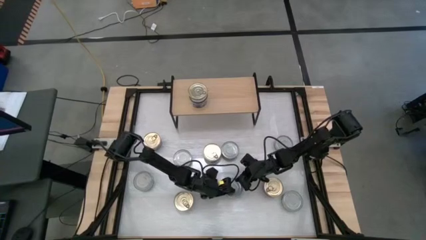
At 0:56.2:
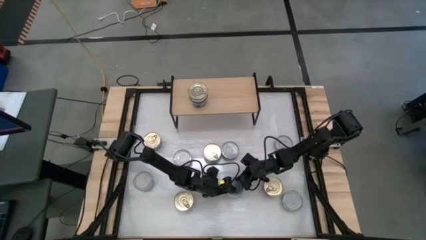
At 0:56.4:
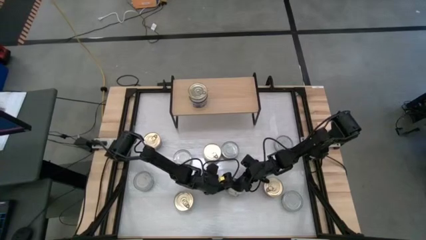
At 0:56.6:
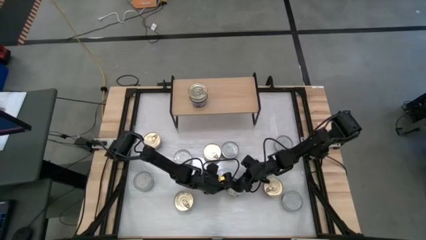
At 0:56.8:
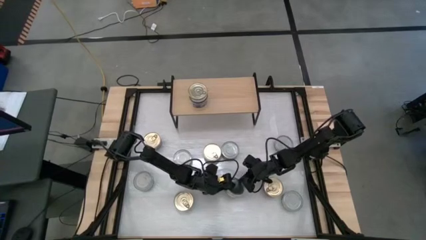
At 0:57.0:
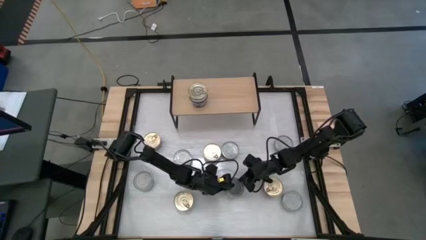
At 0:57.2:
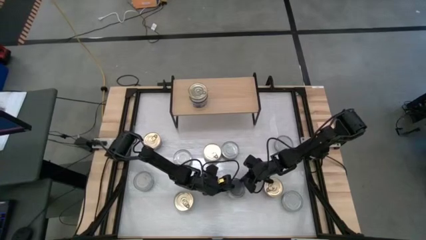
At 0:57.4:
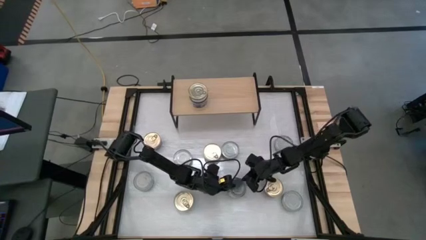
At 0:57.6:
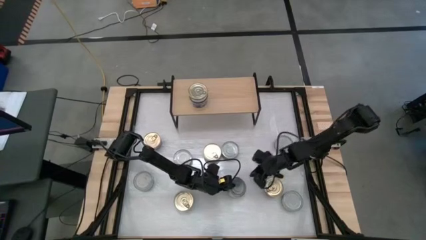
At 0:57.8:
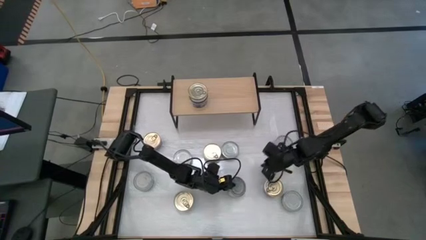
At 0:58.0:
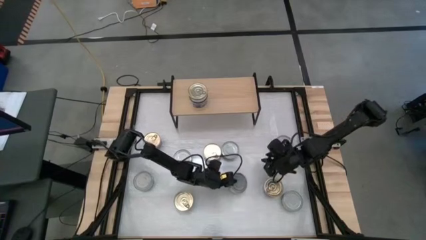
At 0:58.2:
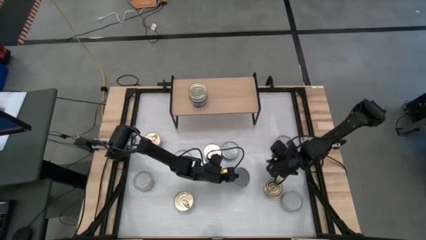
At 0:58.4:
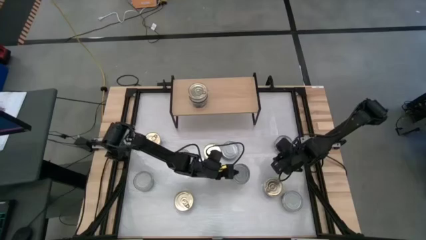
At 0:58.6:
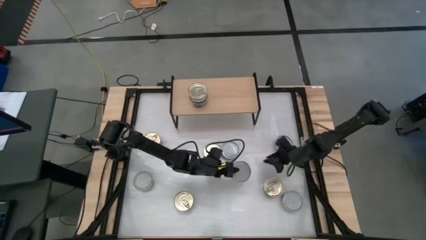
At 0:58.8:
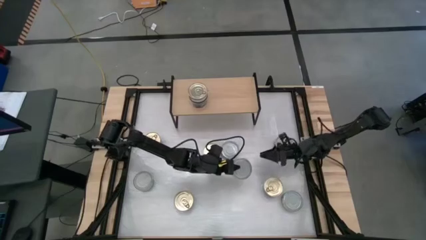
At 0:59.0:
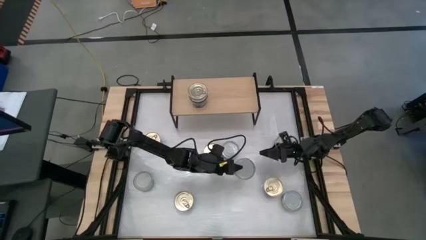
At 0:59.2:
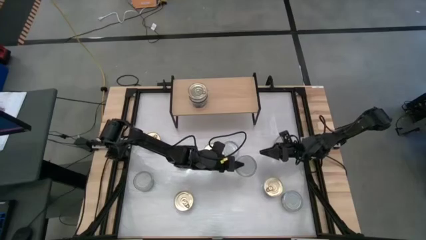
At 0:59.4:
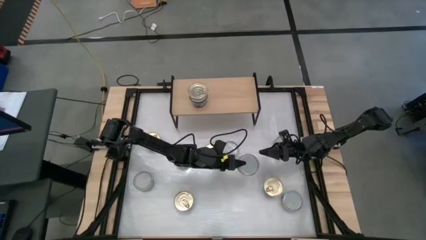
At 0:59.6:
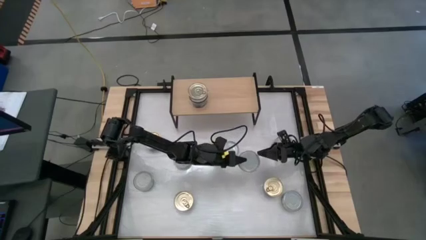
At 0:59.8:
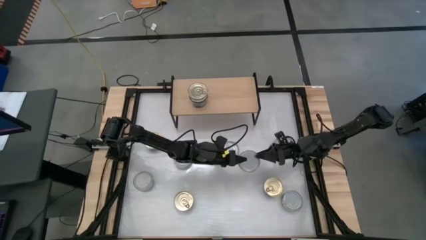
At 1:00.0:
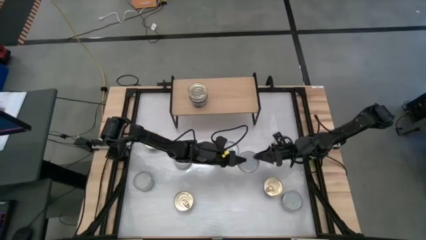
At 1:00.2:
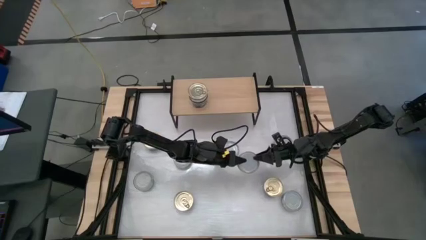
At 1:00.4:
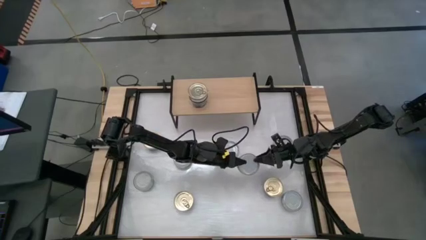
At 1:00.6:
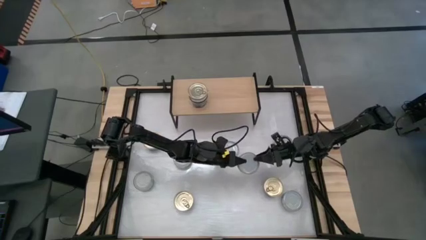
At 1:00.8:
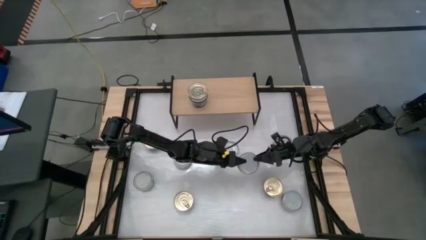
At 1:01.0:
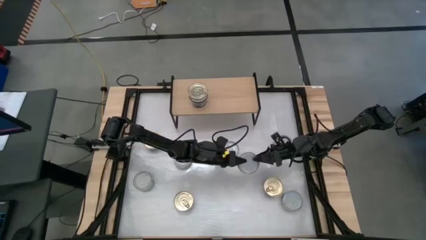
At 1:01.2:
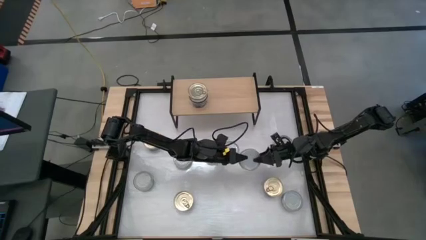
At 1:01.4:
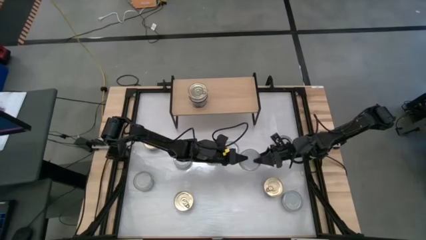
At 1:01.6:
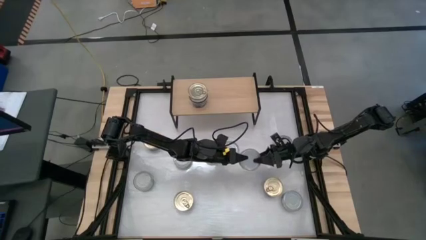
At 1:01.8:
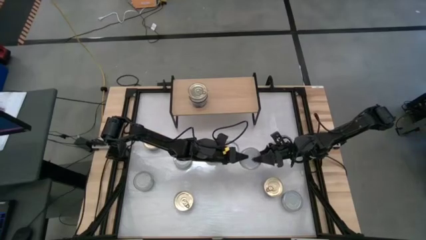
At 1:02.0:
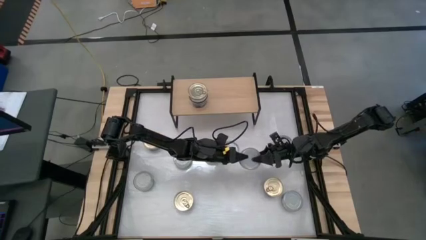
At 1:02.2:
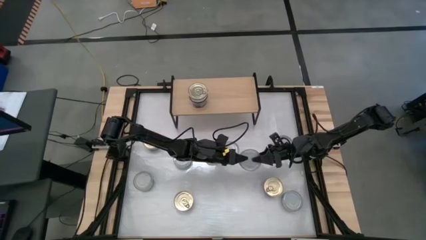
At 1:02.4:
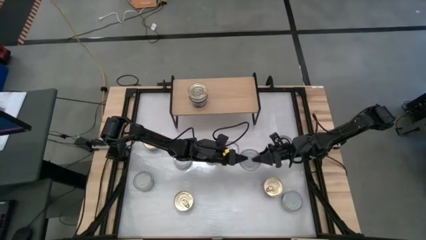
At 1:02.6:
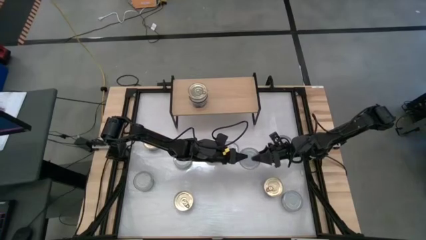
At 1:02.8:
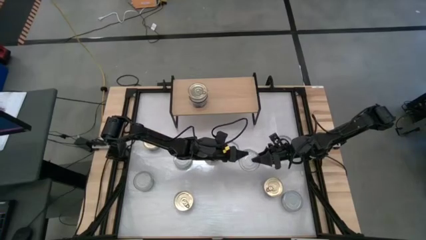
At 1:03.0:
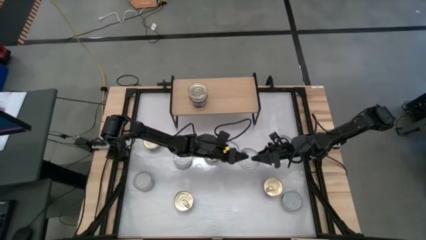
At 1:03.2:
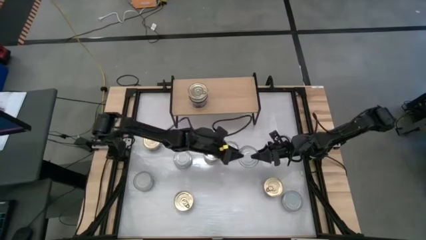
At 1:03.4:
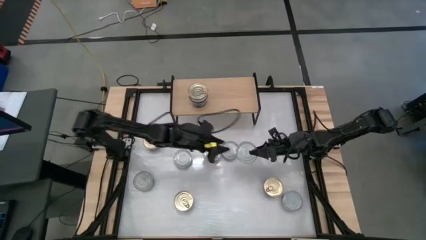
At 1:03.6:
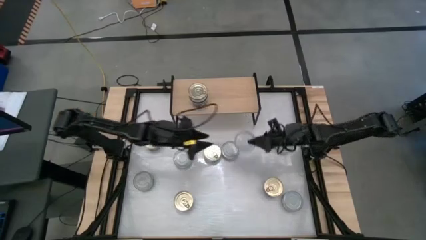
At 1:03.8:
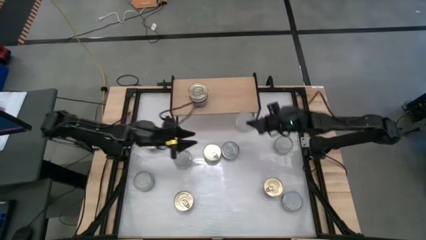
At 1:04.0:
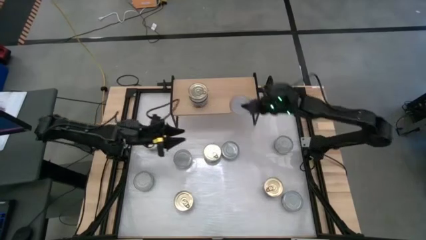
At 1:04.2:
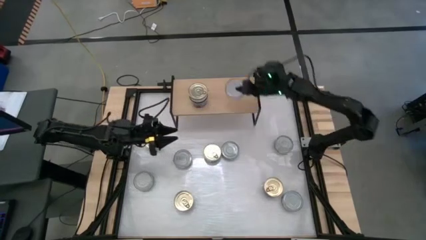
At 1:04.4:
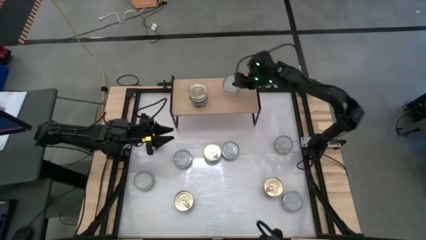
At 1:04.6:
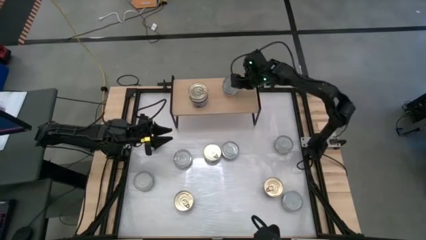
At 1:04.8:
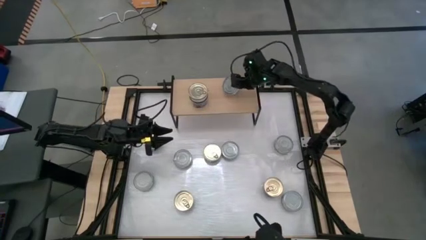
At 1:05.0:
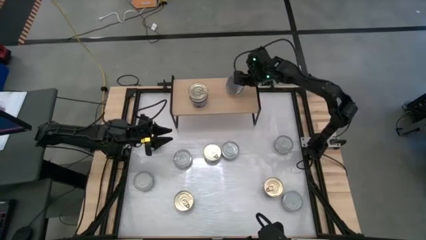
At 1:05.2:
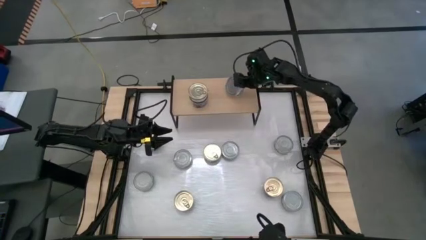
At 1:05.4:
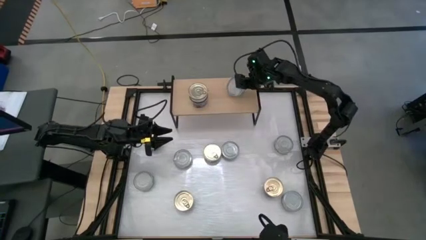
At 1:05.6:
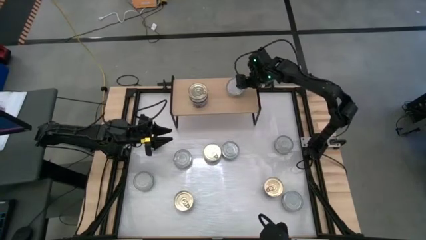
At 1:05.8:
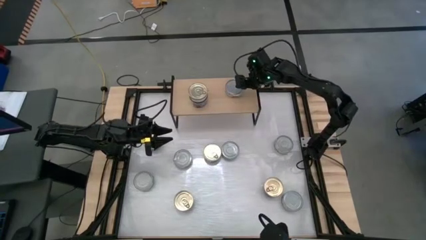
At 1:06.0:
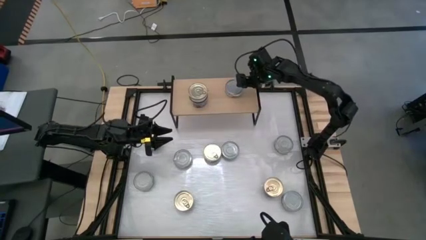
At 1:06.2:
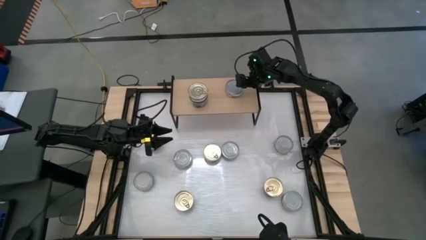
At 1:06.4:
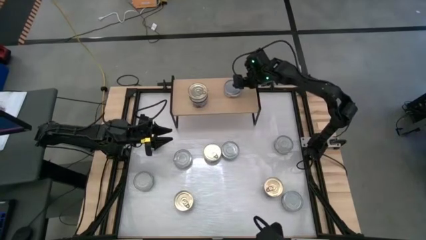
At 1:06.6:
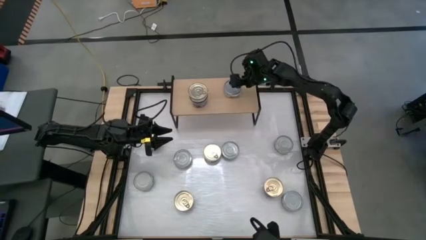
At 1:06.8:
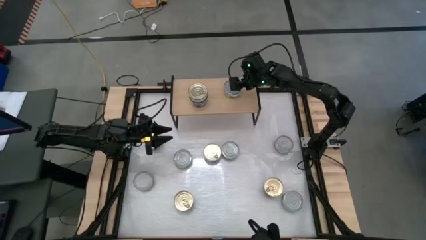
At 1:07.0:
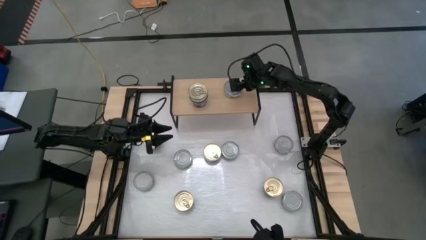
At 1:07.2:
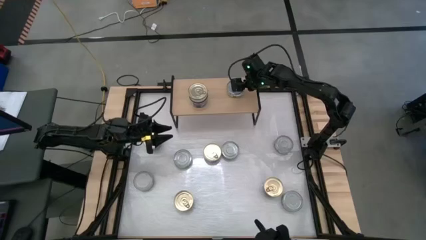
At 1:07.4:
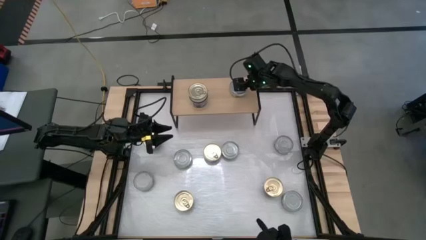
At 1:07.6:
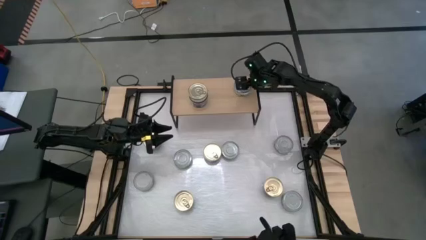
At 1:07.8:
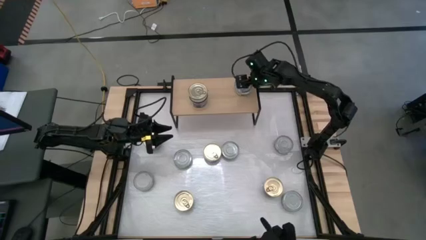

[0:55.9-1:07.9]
Task: Stack canned seafood by type on shelf
Put the green white tuna can on the shelf
